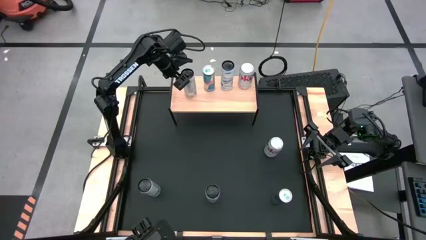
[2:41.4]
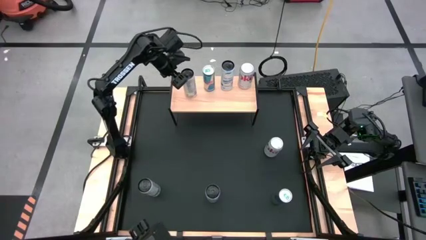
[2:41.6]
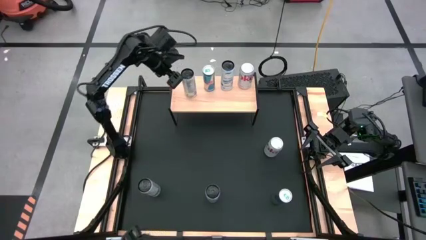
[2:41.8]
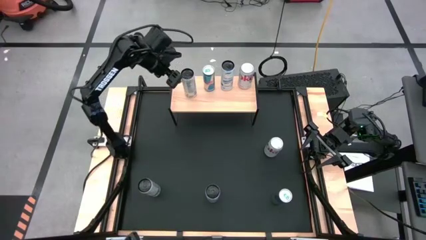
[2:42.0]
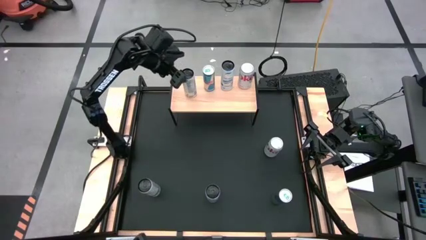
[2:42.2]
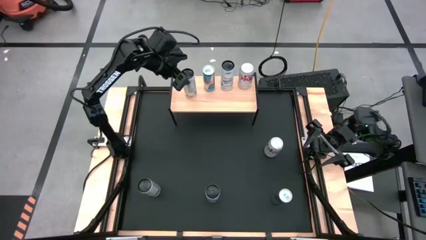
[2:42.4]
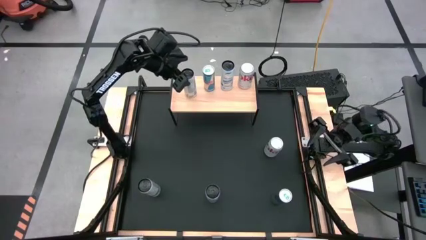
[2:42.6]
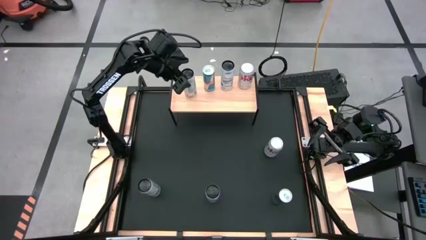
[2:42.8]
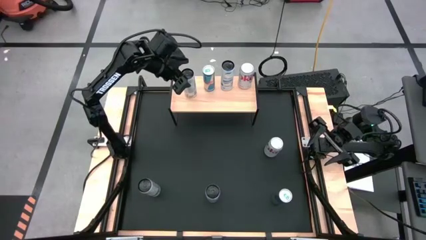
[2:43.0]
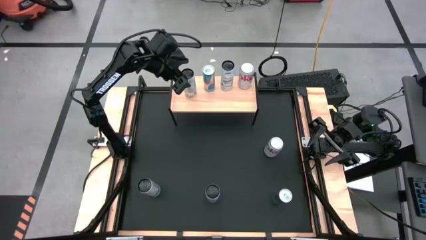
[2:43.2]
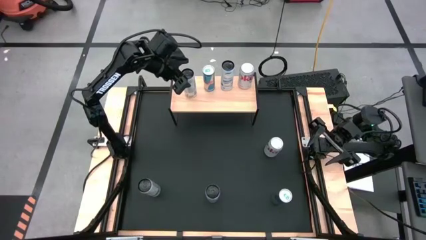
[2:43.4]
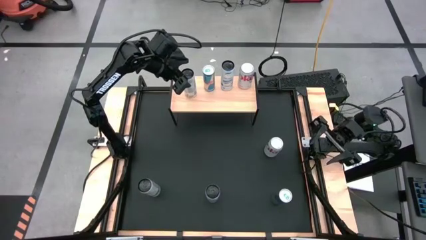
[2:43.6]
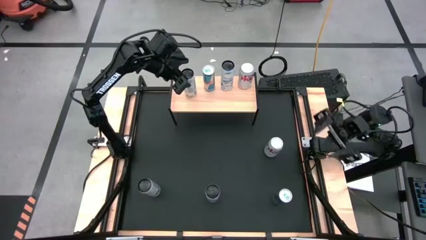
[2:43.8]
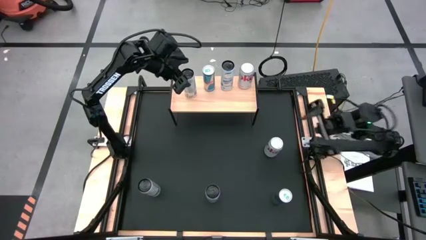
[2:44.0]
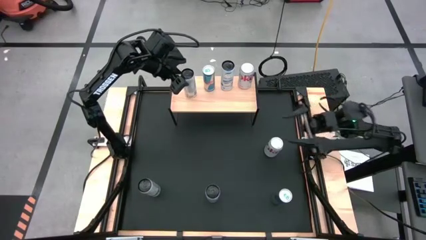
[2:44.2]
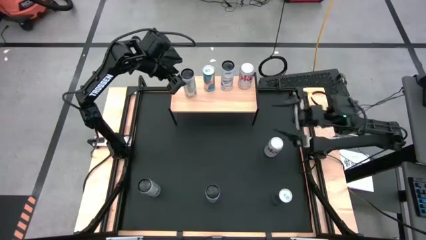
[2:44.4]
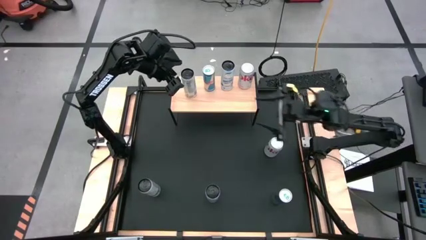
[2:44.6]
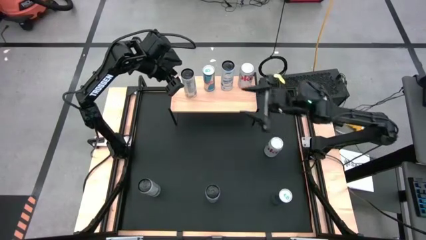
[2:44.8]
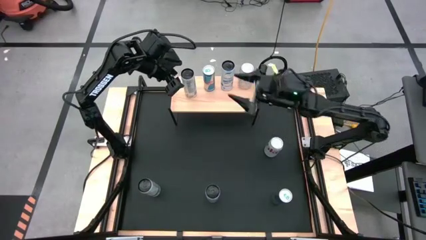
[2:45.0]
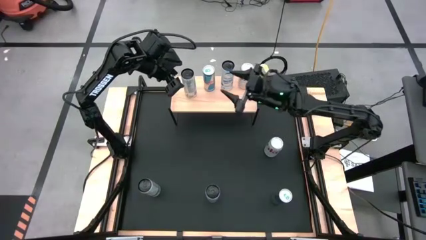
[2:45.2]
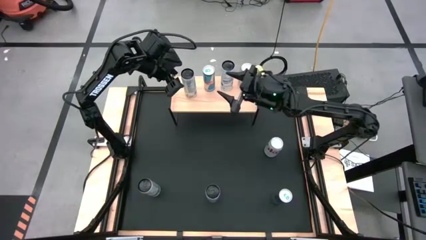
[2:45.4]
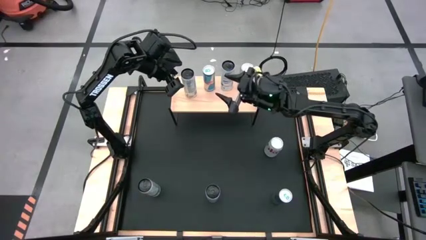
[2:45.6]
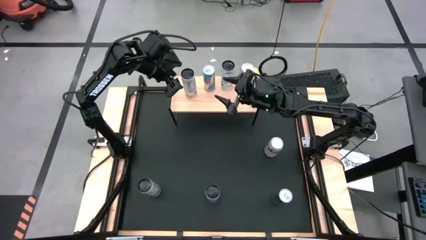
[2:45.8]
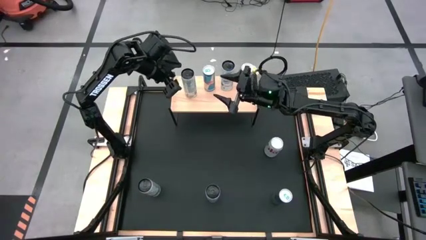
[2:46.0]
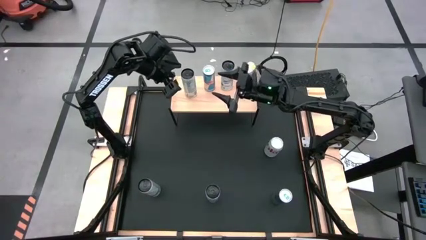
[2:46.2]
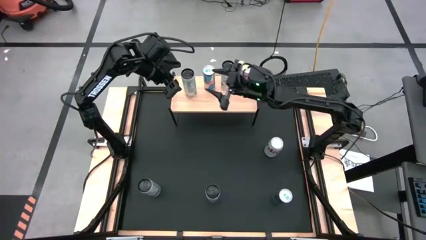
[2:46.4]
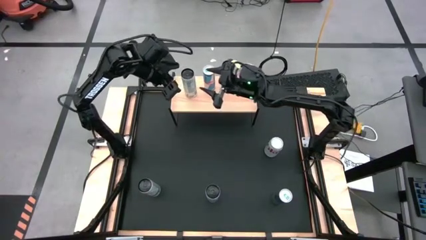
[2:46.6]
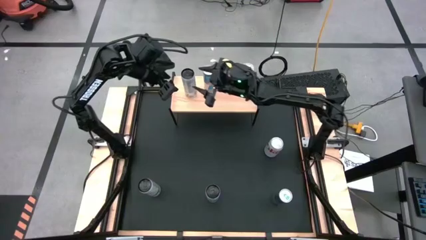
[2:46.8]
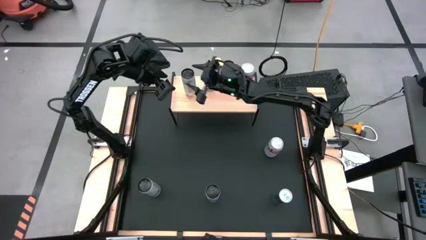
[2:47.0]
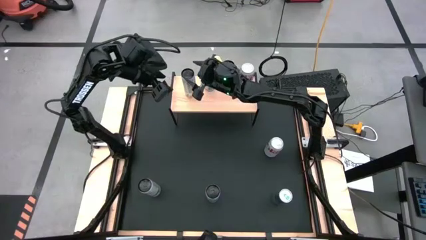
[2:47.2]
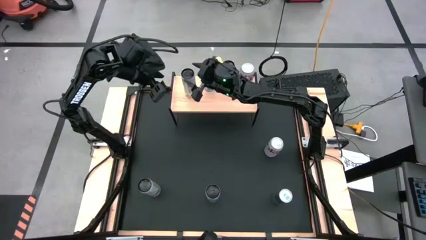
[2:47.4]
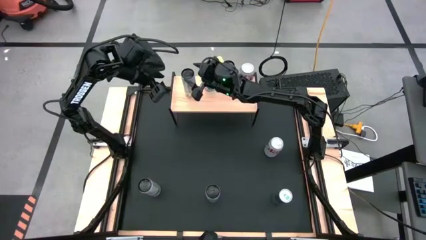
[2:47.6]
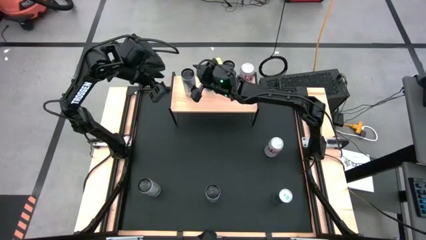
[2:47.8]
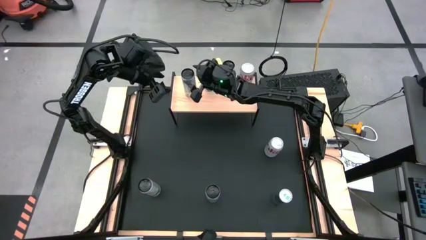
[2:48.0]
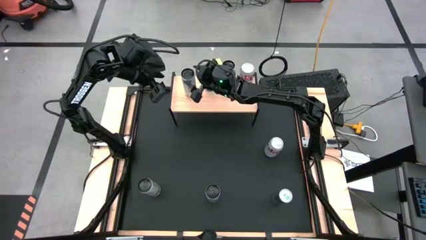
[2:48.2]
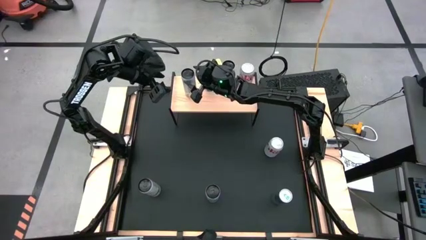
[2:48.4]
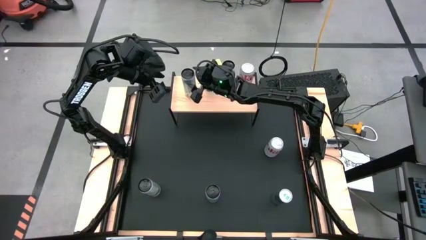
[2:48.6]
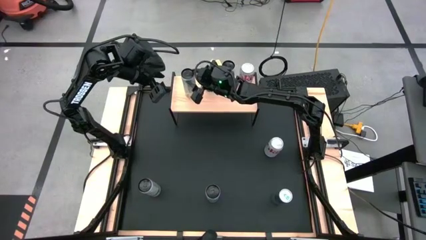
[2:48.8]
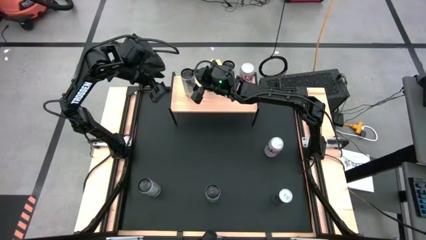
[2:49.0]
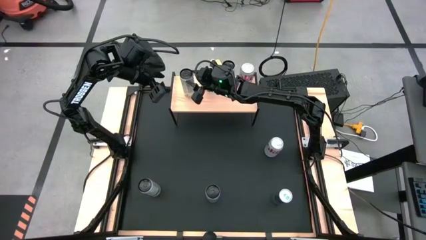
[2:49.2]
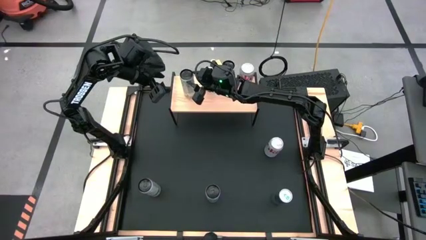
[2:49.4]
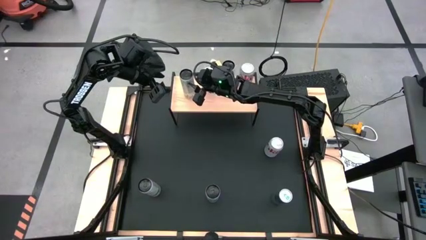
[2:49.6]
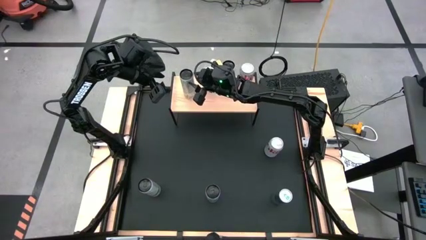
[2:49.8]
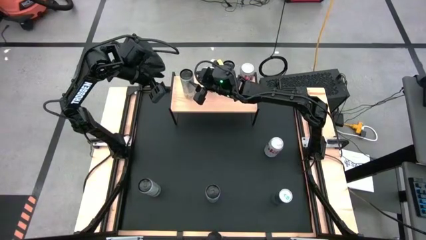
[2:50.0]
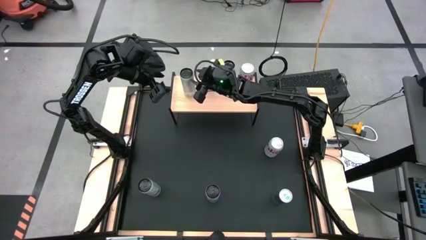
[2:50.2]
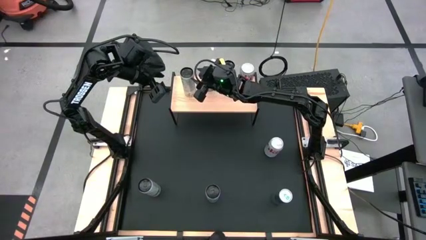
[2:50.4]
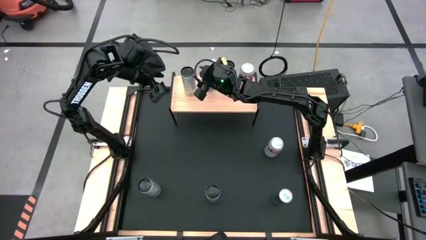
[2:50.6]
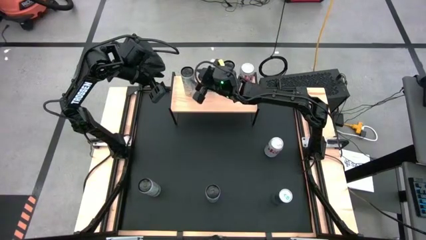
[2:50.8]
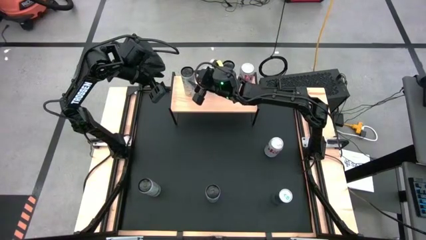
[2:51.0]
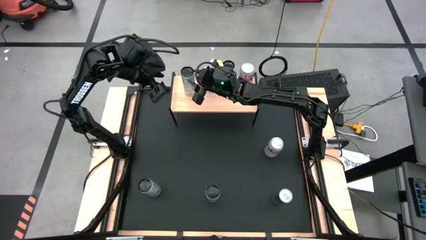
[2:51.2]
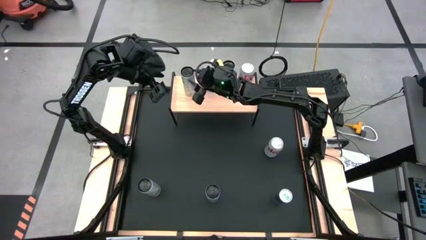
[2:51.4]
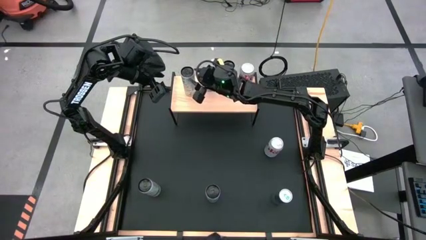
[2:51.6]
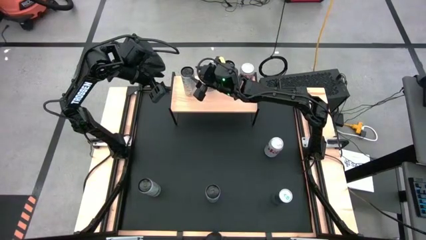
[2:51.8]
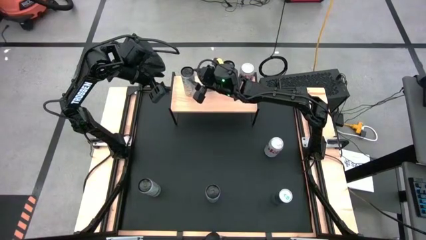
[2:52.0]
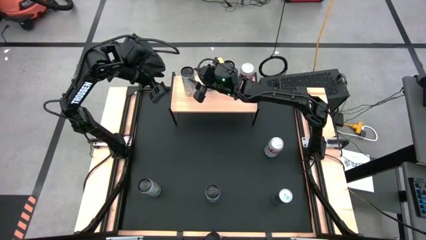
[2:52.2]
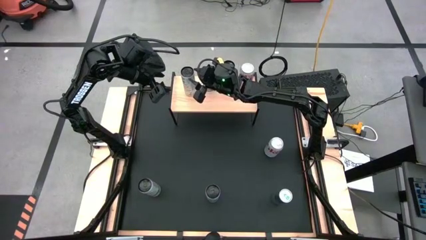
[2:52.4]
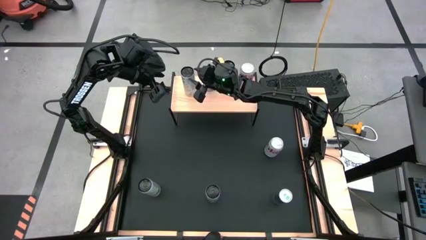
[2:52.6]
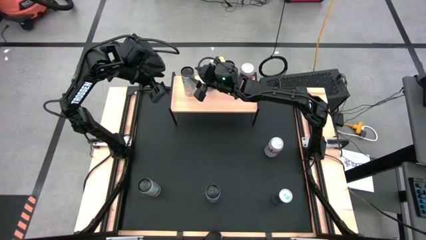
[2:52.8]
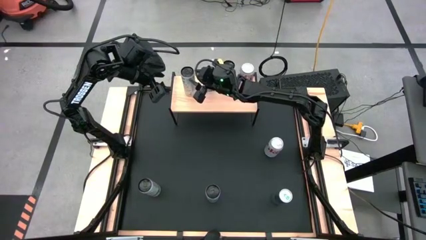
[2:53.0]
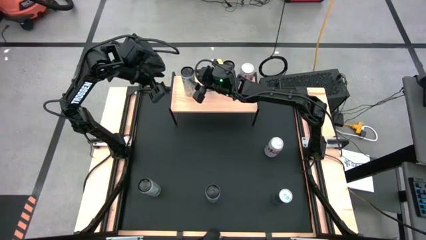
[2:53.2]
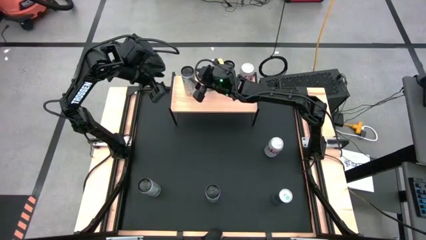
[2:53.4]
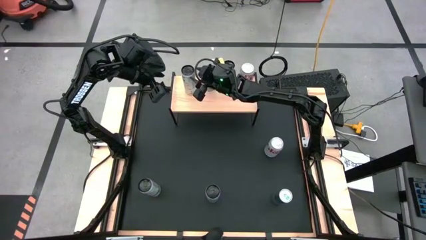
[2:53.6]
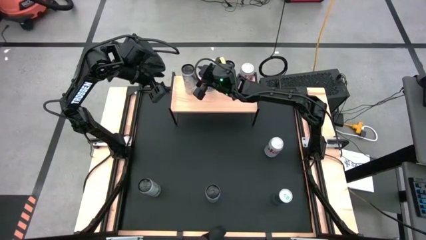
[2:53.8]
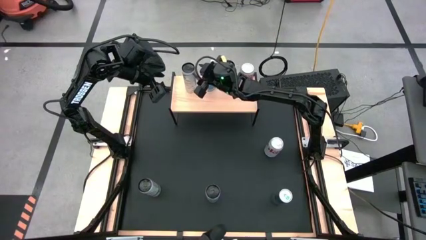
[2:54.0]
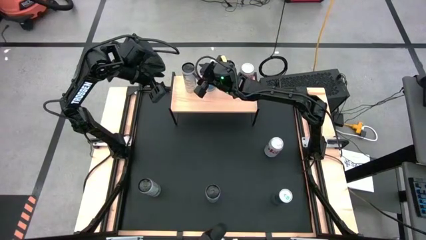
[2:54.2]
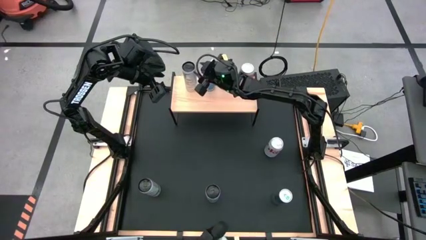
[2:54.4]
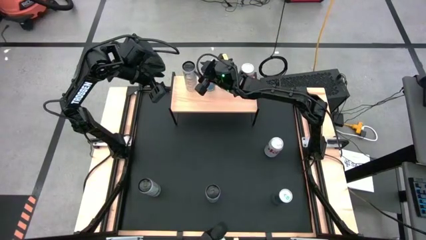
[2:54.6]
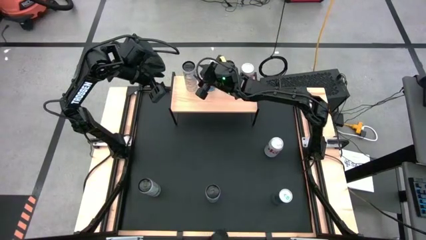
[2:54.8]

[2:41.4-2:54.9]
Task: Place canned beverage on shelf
Adjust the white and black soda can

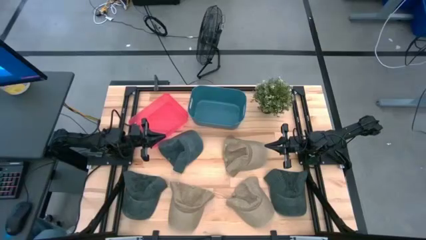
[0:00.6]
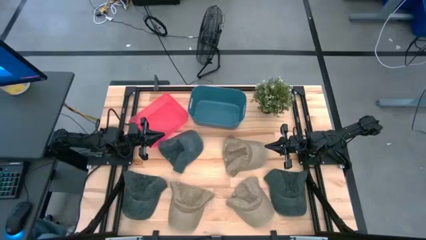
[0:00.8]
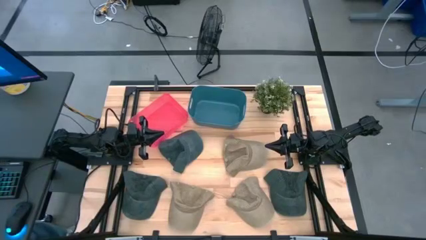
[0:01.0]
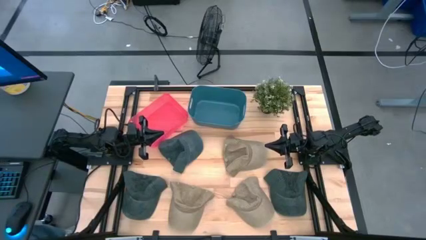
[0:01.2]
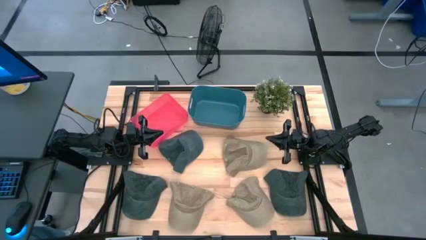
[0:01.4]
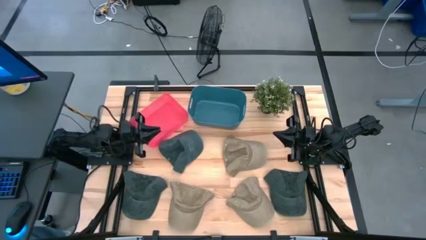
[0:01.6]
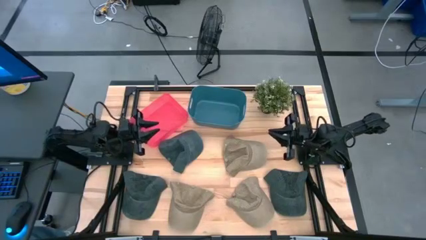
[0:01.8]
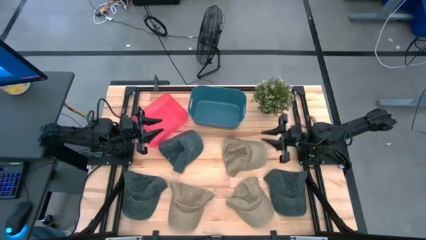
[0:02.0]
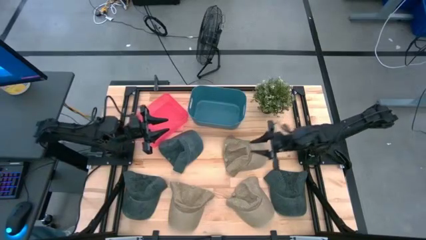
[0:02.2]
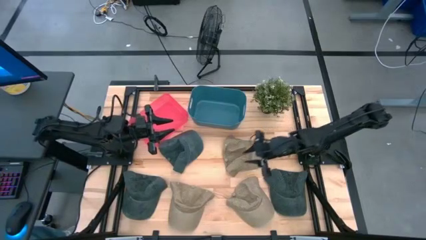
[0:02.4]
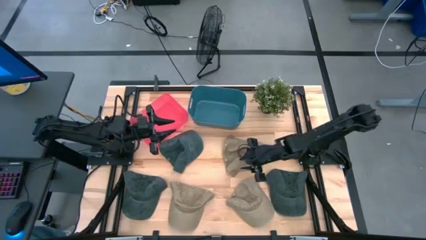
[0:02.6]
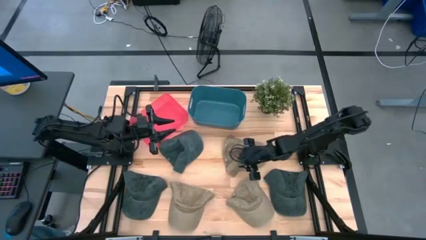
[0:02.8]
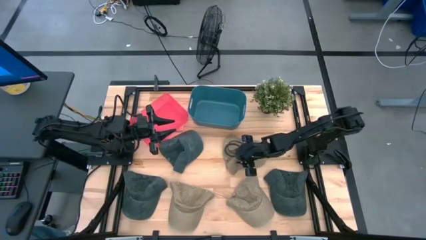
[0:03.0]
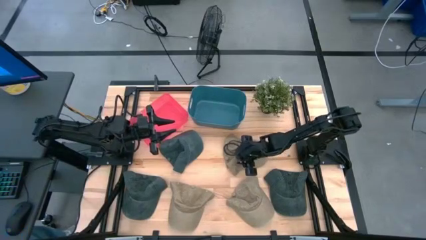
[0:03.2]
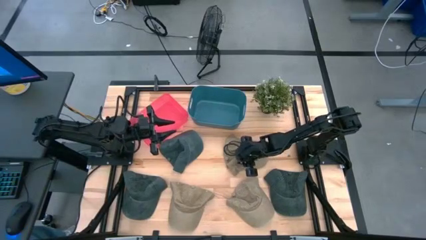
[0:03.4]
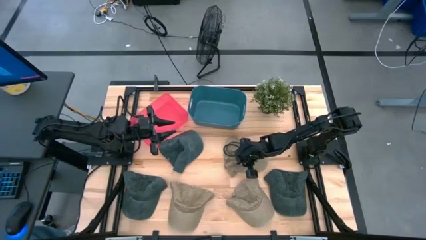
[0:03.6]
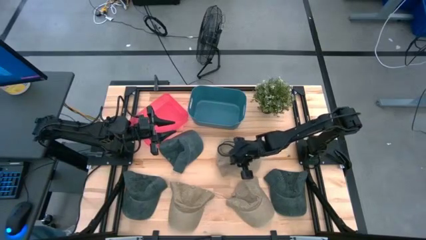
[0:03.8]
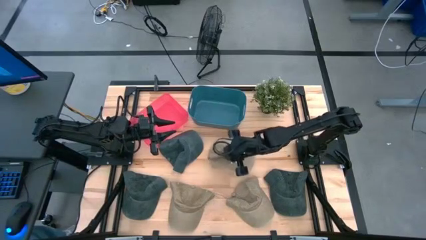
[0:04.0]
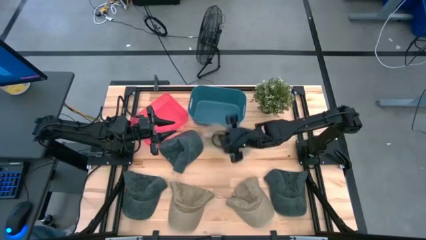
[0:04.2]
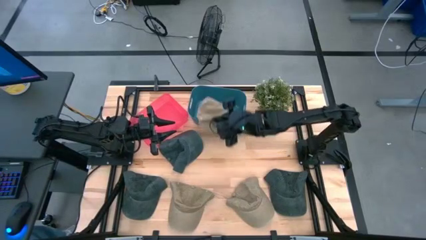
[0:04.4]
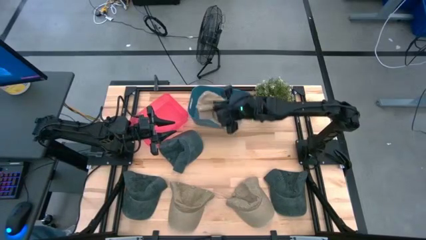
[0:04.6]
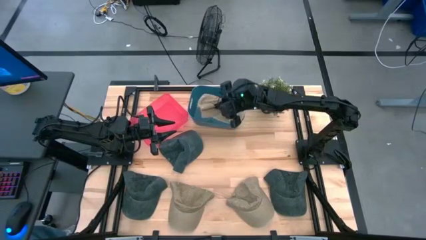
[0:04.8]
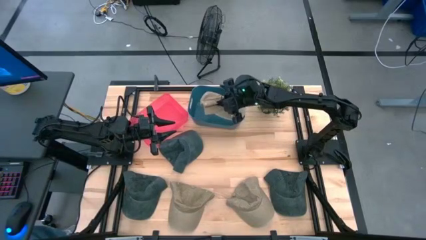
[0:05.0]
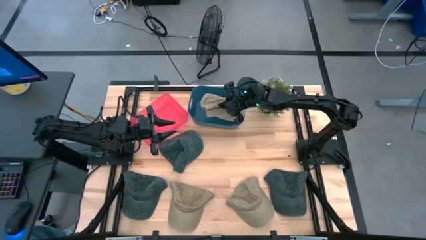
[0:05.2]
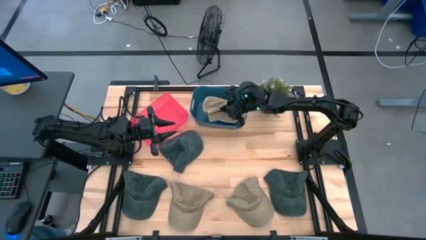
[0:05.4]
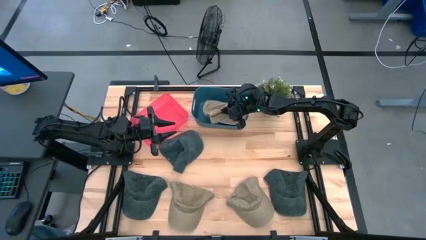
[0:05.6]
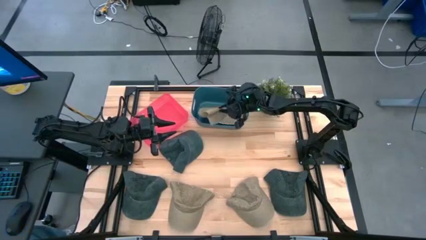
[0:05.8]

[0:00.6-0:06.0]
Task: Pick & Place hat
Put the top right brown cap into the blue bin
